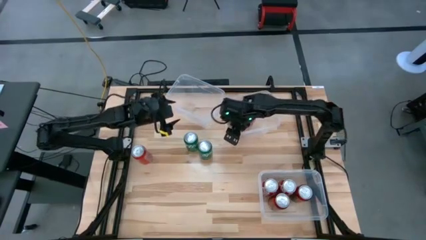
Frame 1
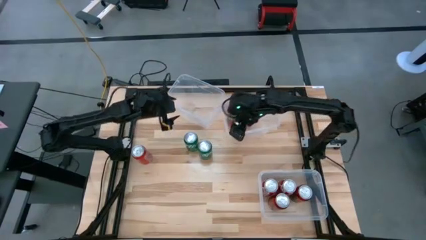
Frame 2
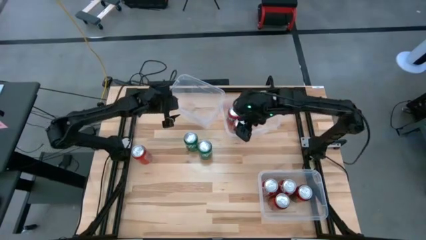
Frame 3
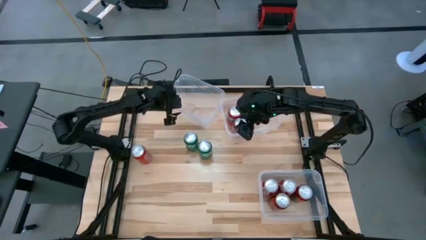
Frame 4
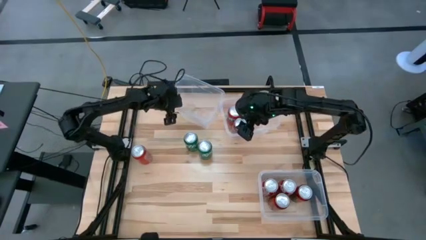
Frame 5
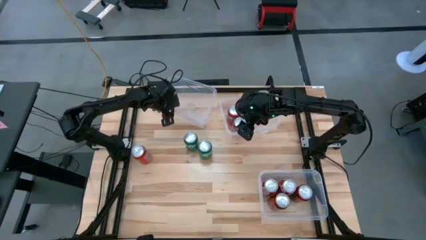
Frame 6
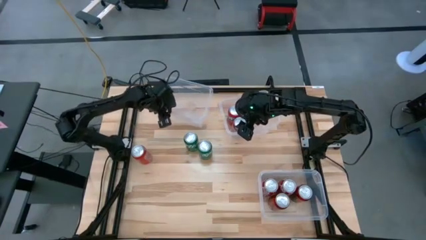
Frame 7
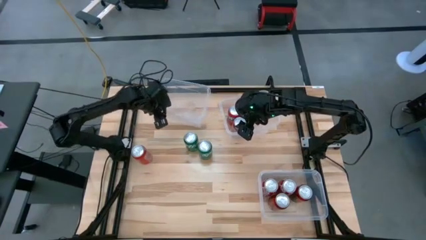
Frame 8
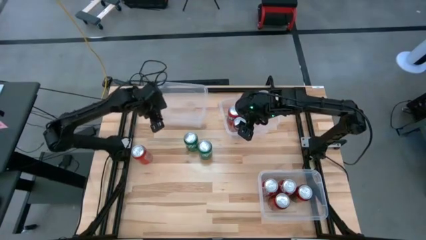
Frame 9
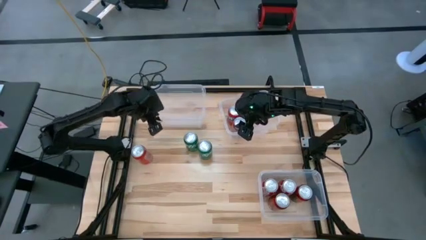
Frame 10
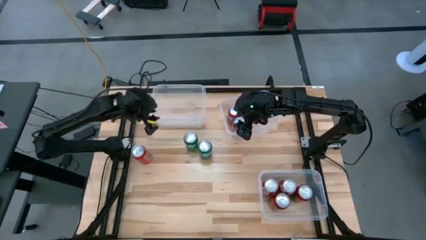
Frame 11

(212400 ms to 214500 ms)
Task: Sort soda cans
Adjust the top left transparent bin

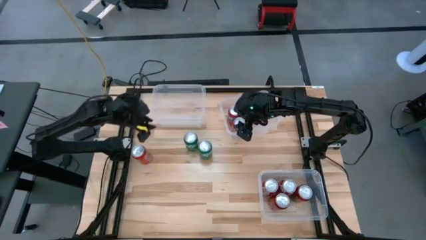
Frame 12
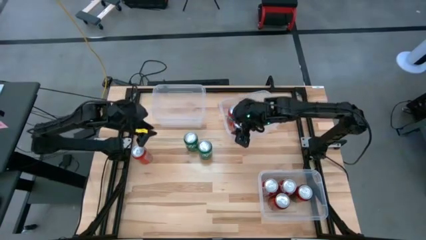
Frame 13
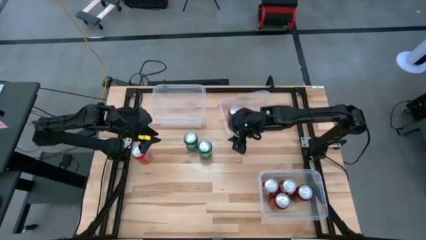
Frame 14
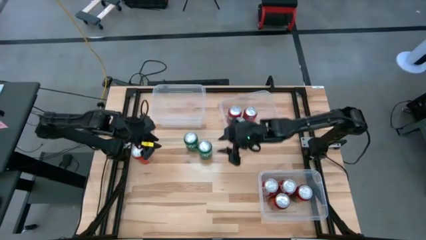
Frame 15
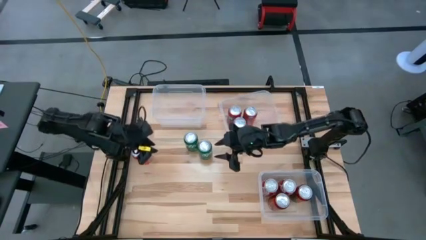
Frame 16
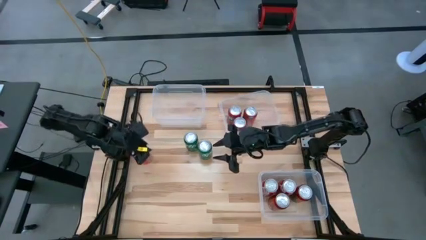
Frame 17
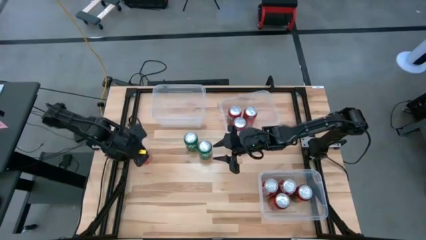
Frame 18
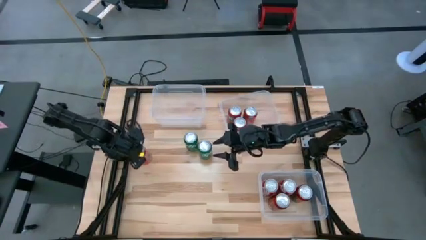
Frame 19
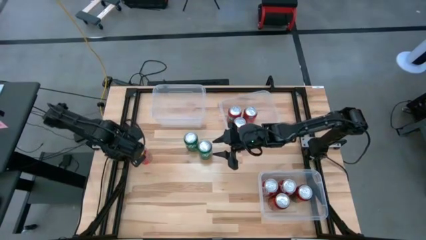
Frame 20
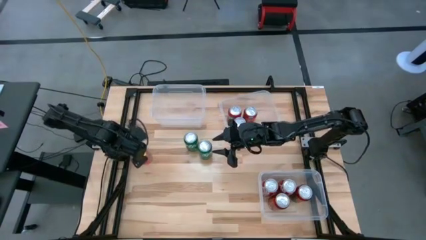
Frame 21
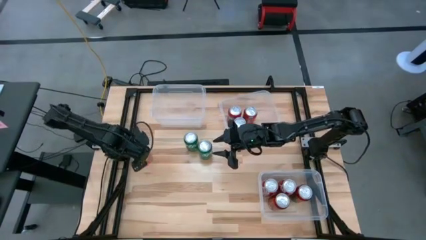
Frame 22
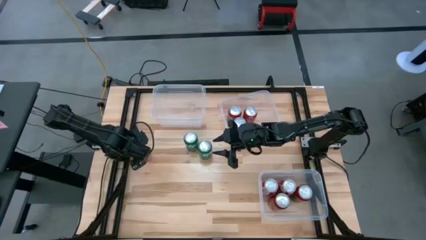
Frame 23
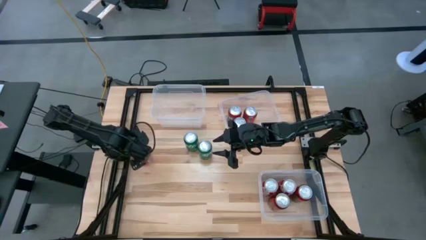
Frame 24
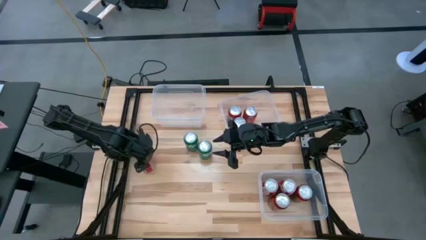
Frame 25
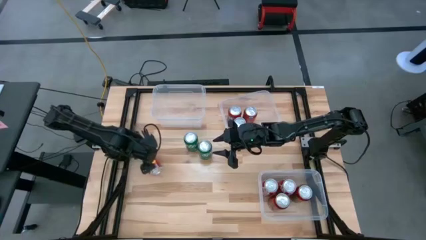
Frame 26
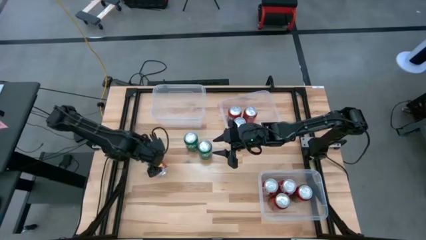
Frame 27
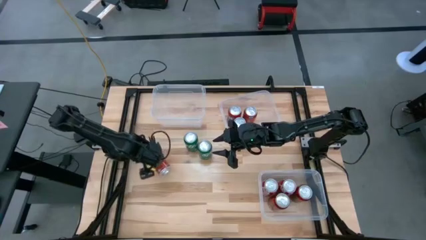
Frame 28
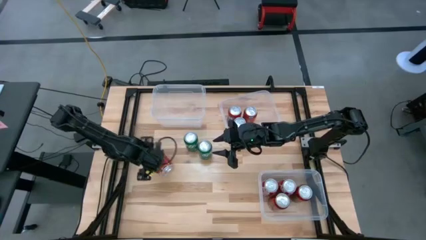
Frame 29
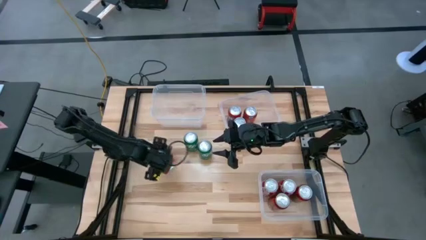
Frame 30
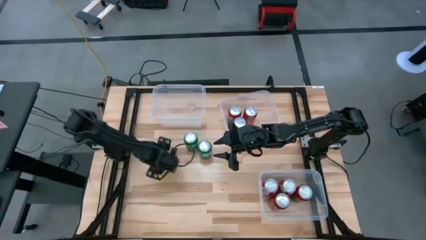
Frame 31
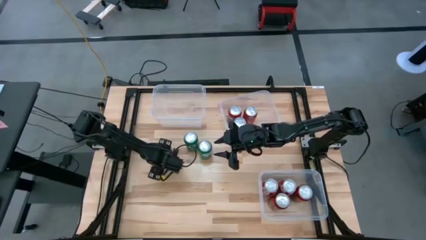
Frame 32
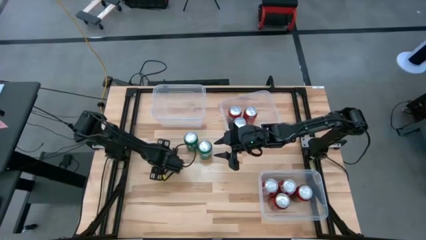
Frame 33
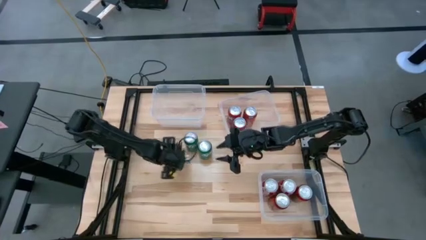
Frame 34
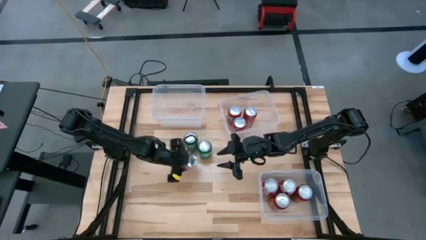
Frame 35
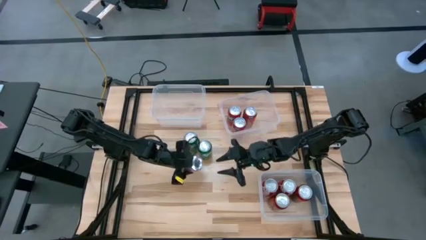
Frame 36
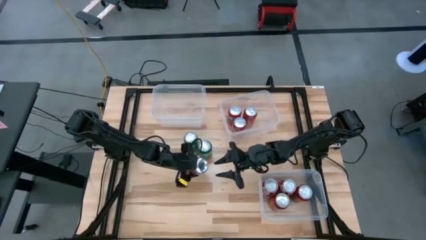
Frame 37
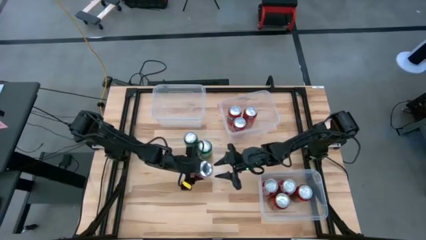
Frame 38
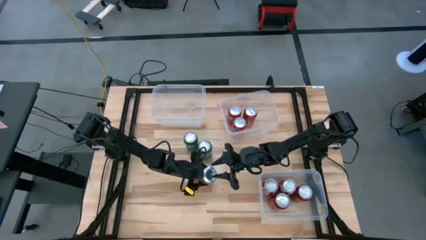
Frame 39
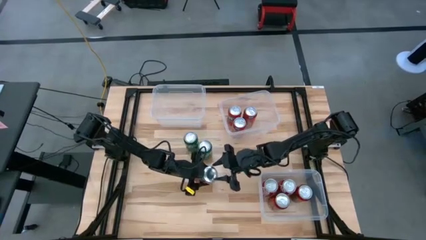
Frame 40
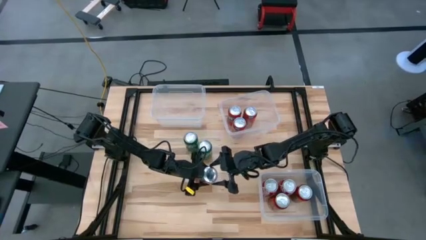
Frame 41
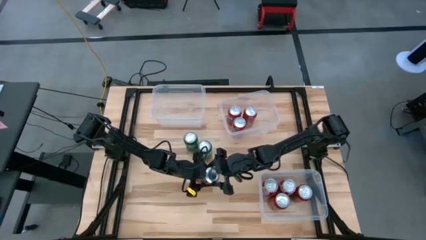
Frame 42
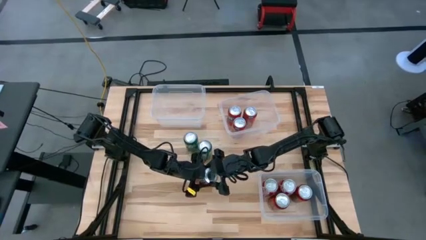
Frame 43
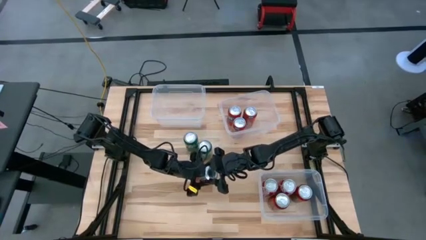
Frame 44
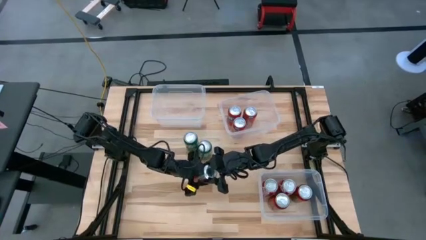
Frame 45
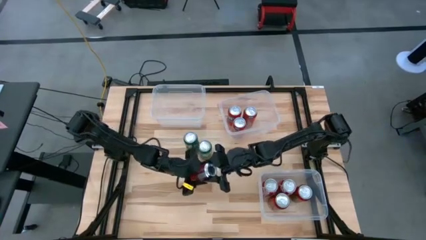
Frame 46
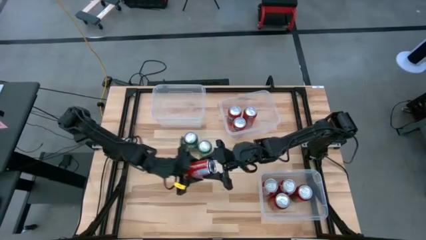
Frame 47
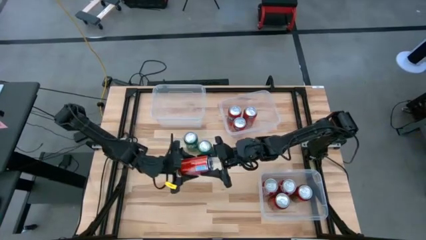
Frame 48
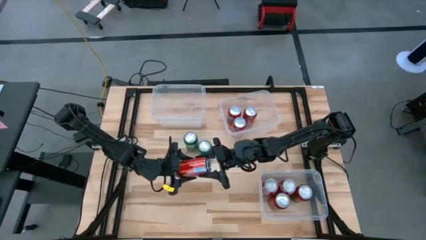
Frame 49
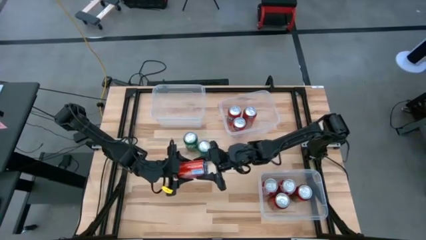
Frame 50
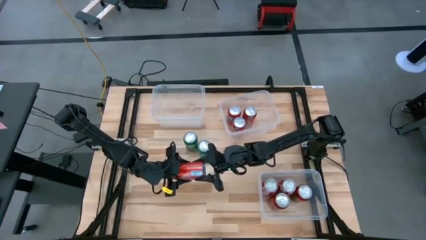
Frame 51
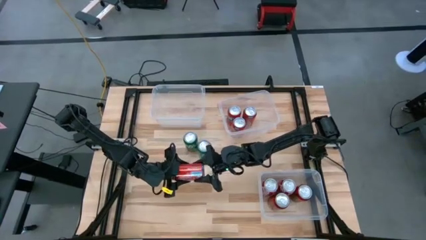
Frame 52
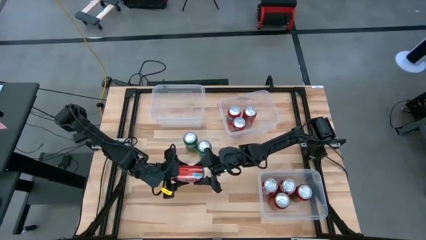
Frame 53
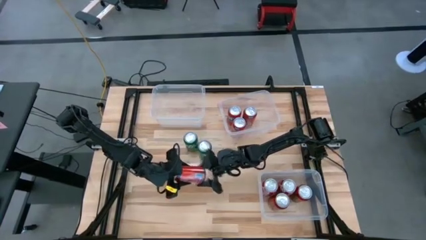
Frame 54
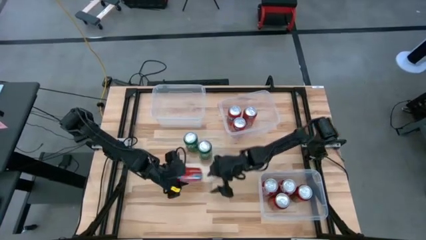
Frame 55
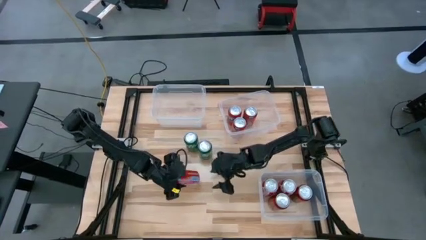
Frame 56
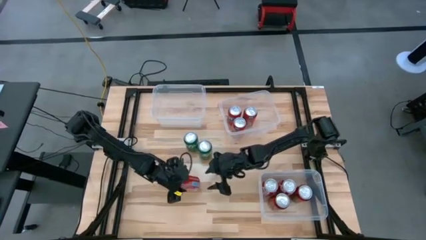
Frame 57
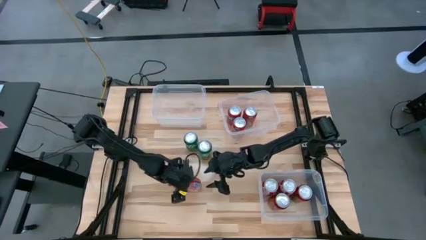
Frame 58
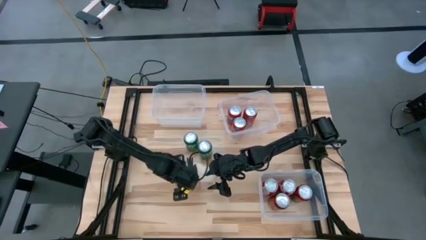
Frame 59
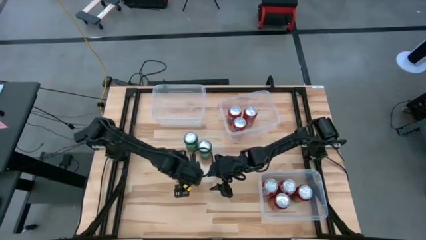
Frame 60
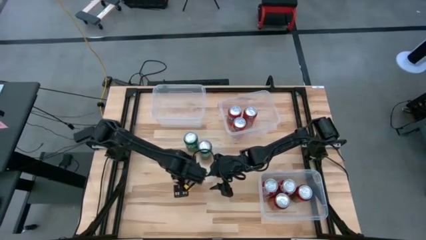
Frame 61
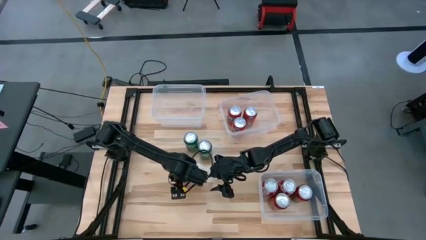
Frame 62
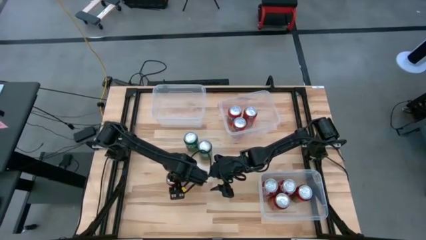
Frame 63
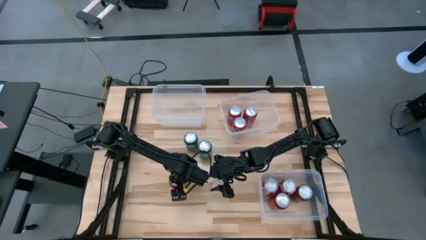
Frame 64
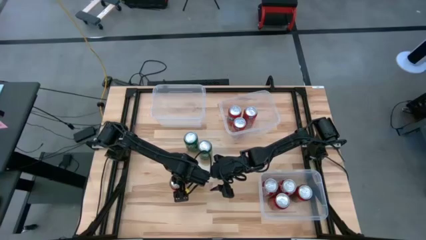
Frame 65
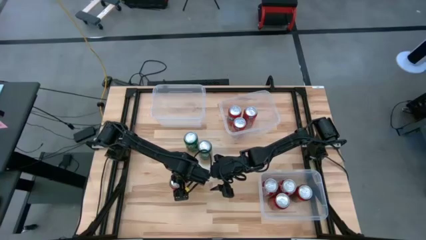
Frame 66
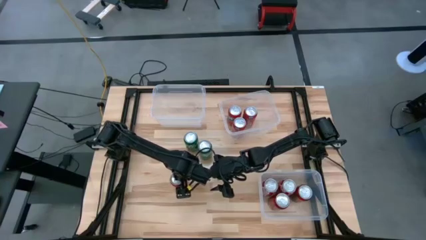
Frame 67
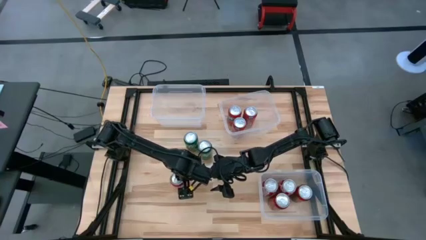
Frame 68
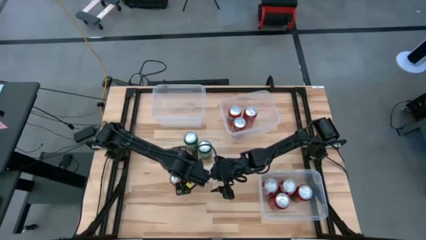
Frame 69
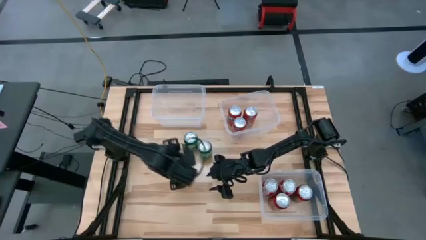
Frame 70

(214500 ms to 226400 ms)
Put the red soda can into the top right transparent bin

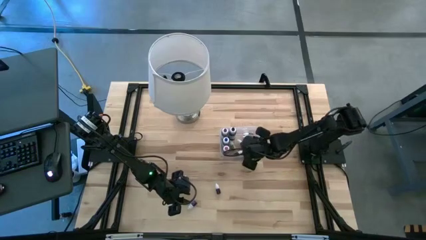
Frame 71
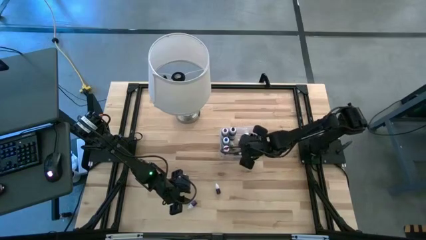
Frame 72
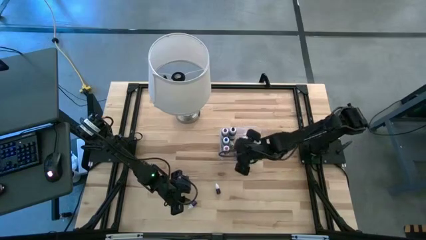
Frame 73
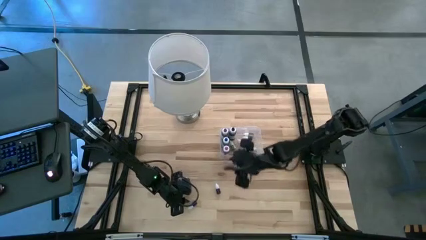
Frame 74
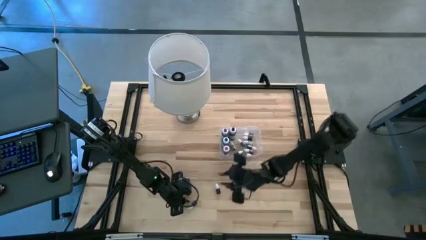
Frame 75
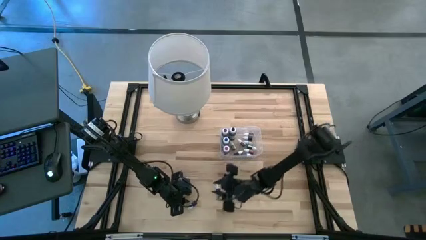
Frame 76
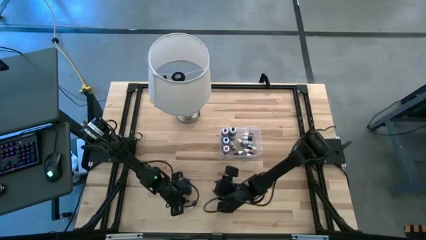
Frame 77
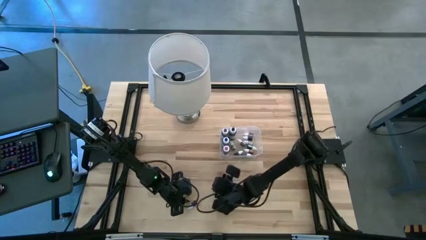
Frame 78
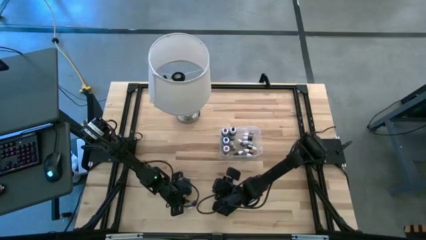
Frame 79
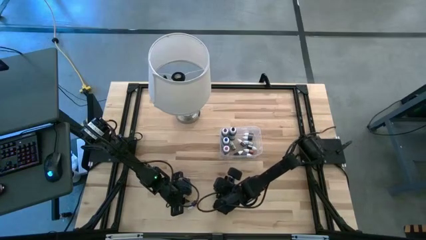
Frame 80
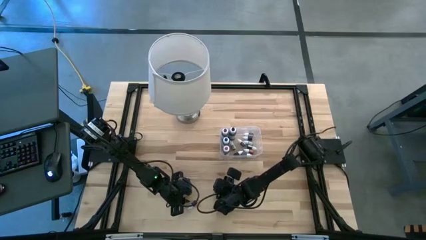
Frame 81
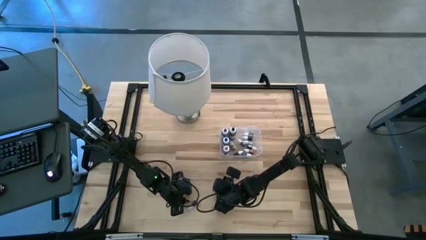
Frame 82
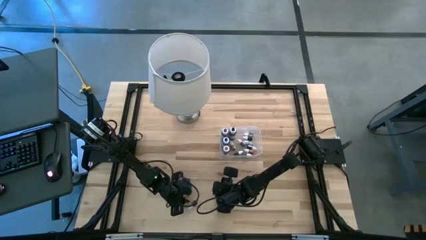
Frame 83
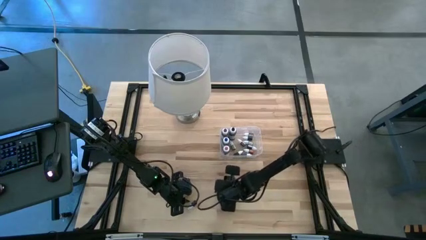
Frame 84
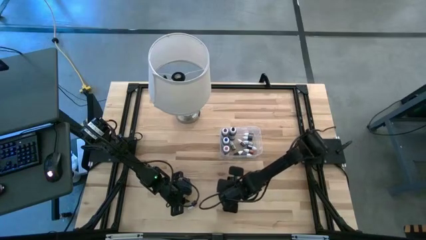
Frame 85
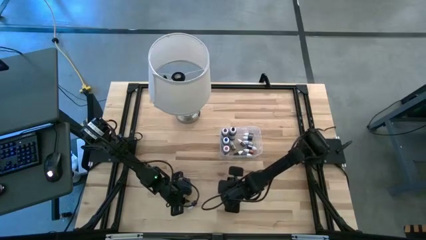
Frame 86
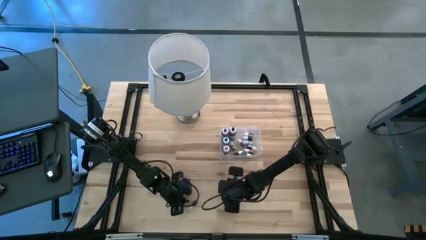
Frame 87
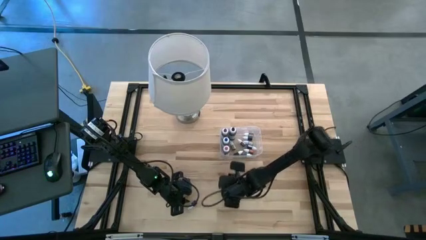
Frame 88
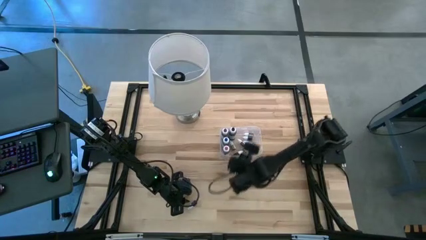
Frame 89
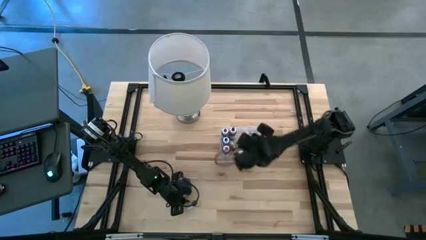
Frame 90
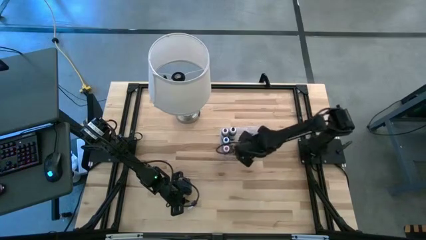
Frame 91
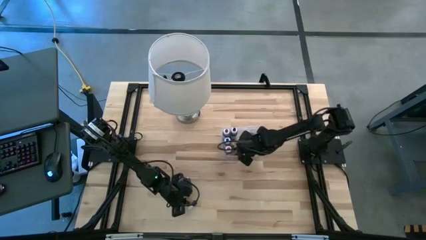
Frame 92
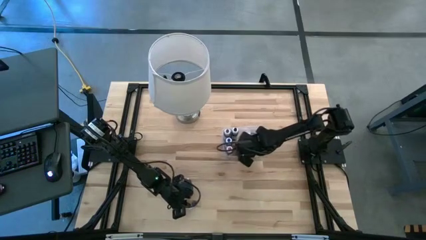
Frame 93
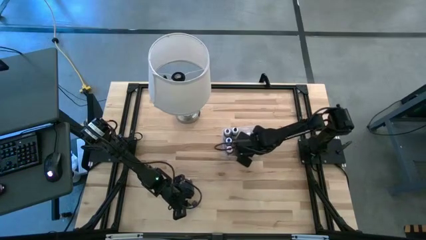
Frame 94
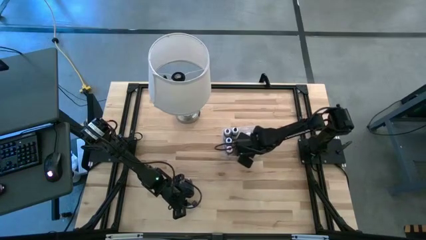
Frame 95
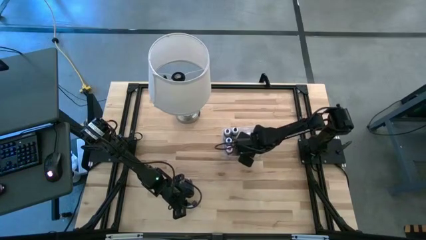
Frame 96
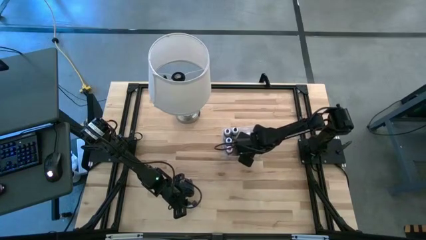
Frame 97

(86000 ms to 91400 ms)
Task: Pick & Place food coloring
Put the small red food coloring bottle into the transparent bin
